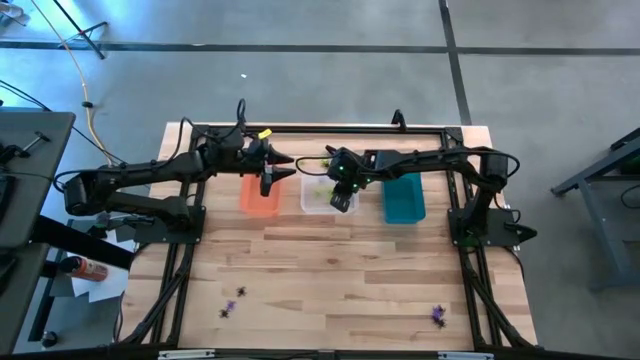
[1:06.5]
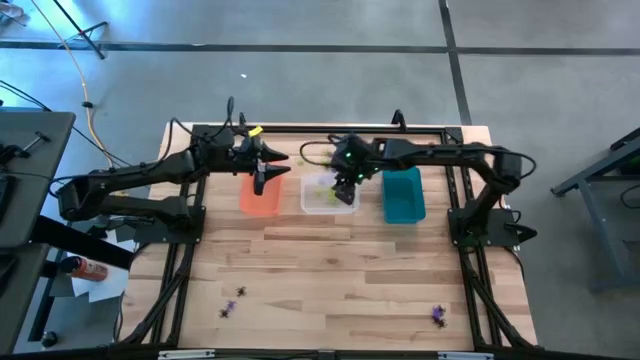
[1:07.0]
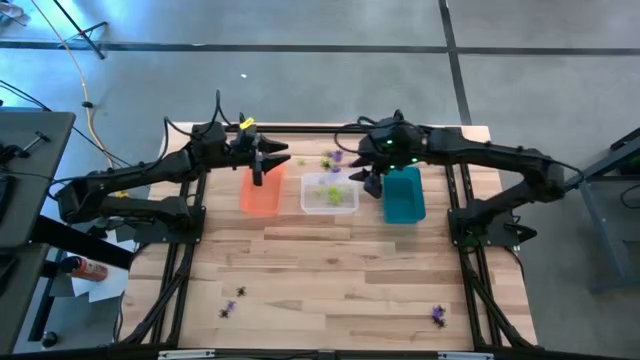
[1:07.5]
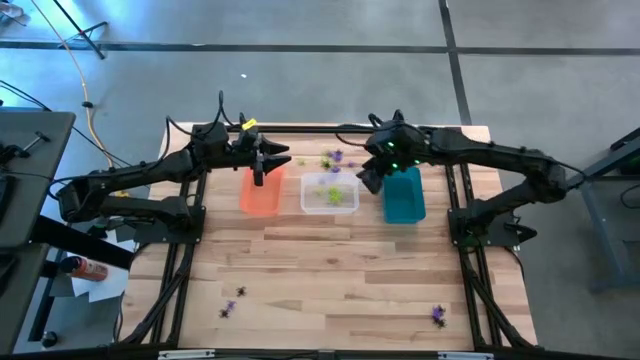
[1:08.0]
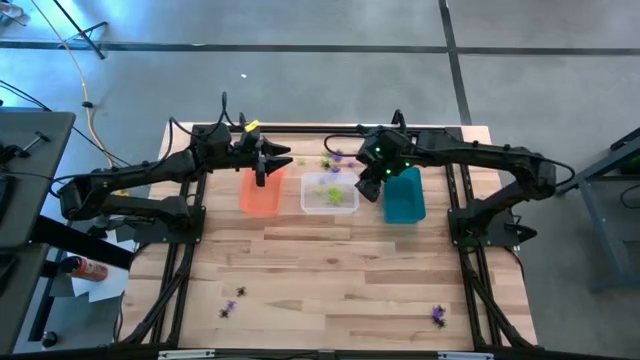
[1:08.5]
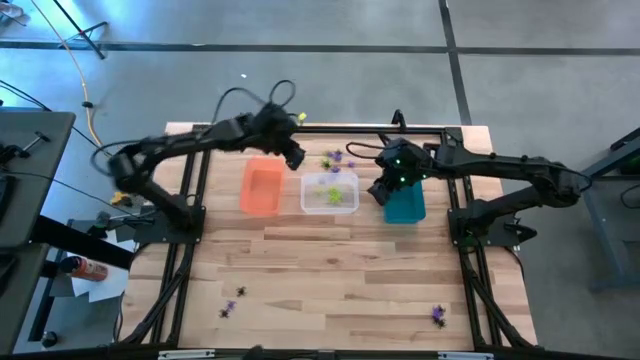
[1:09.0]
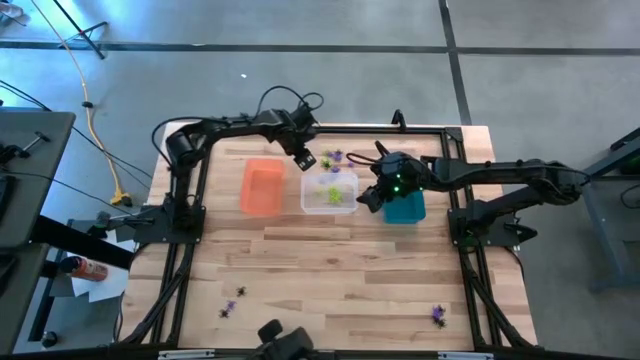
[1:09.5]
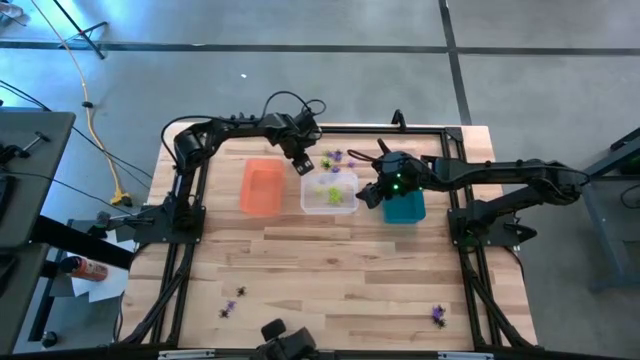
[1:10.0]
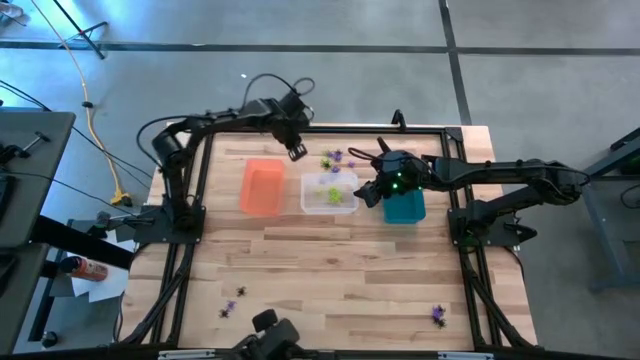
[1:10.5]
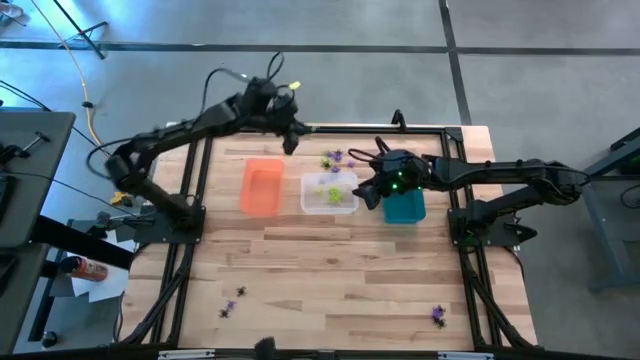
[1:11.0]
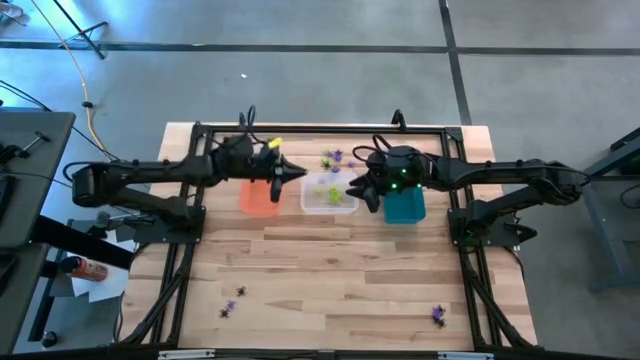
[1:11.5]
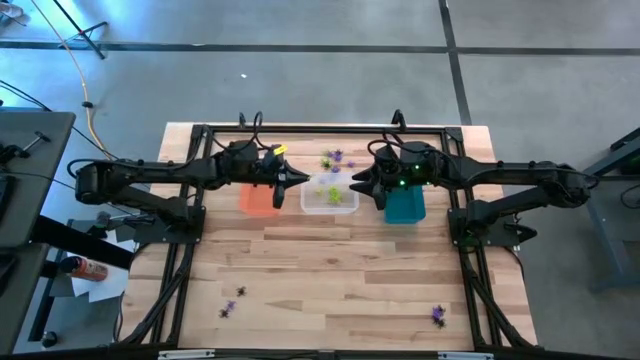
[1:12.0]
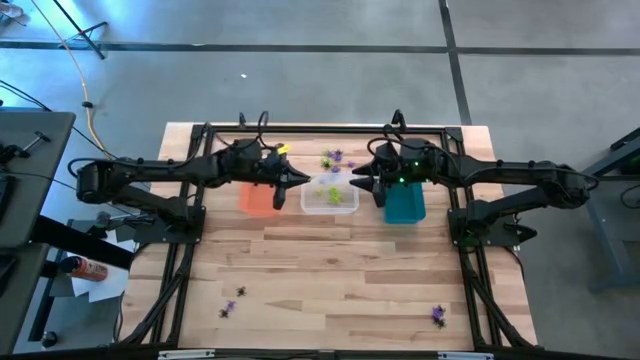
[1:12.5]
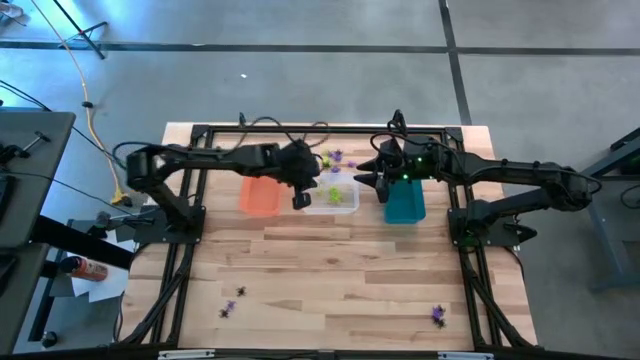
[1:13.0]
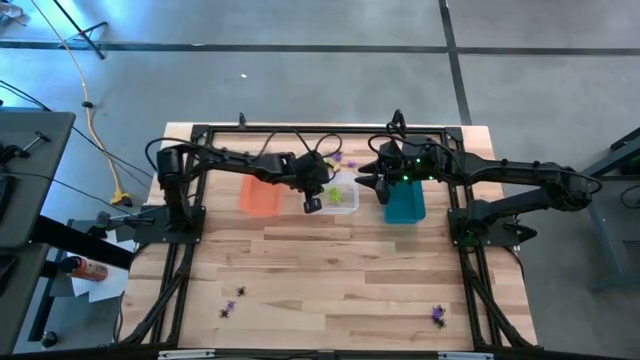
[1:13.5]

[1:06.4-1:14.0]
Task: Sort Halloween decoration
Put the green spider toy into the transparent bin

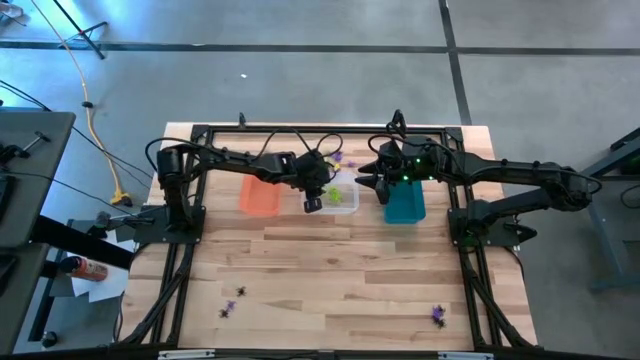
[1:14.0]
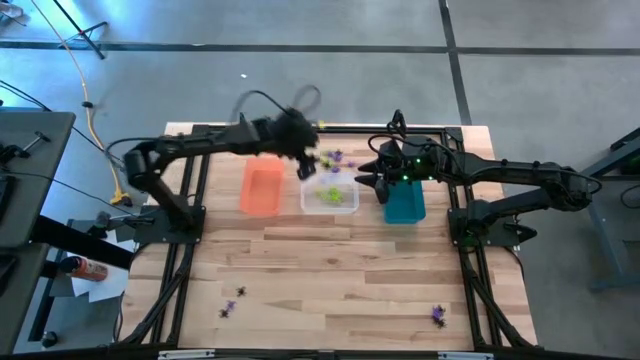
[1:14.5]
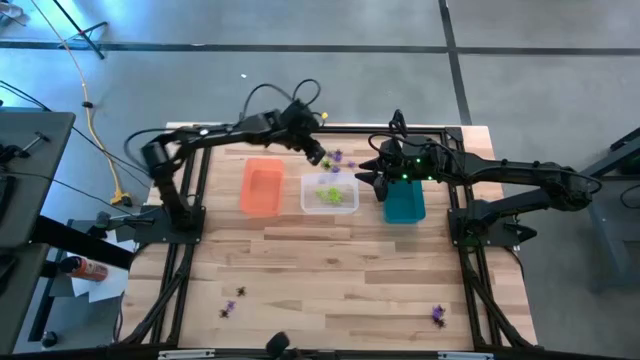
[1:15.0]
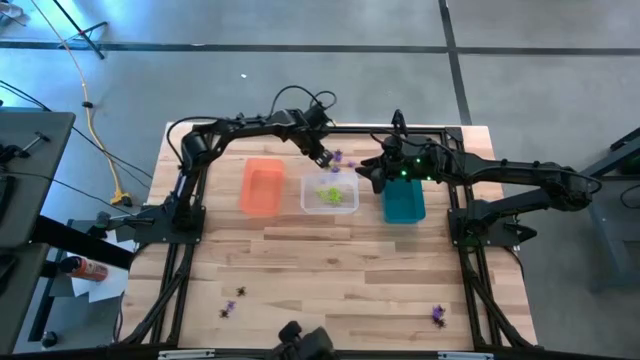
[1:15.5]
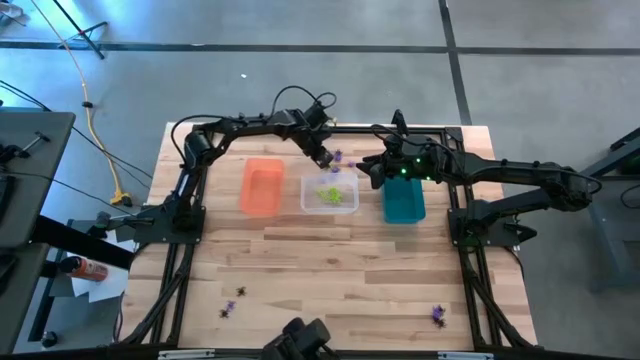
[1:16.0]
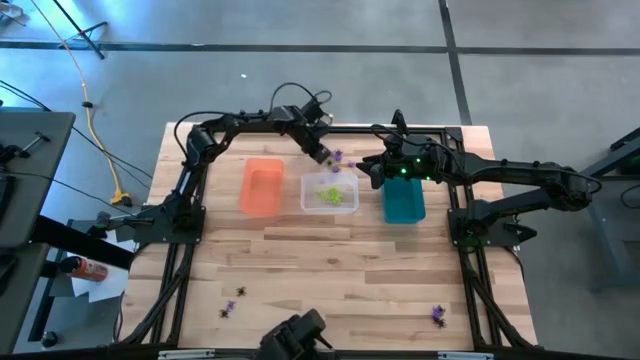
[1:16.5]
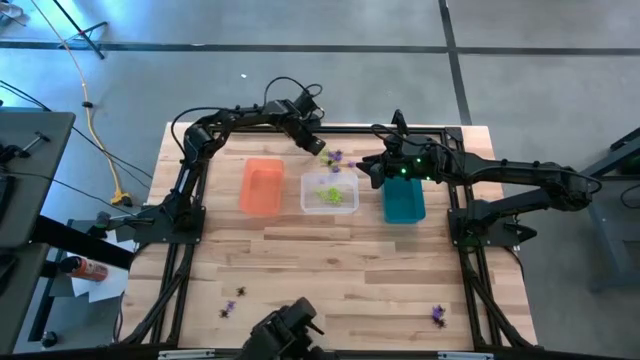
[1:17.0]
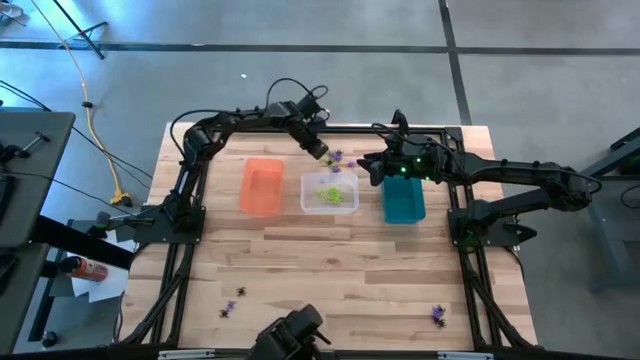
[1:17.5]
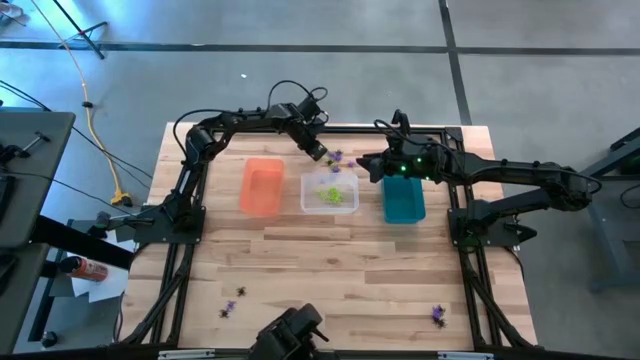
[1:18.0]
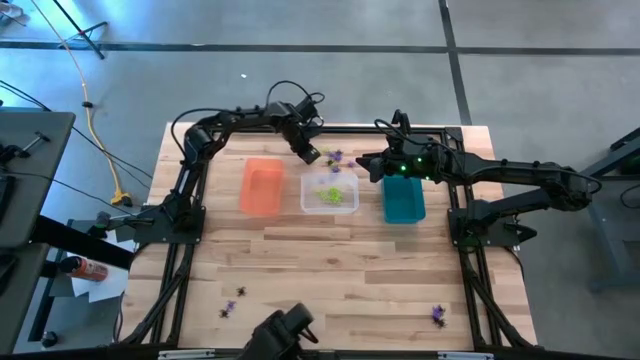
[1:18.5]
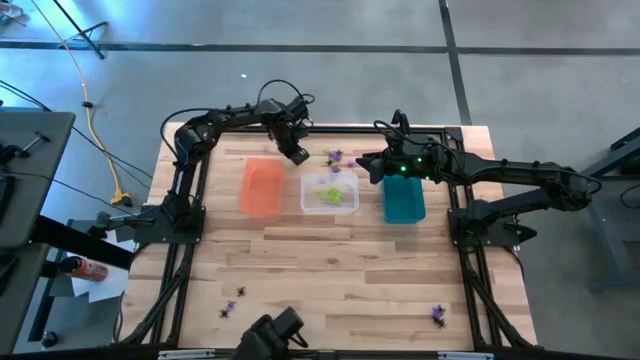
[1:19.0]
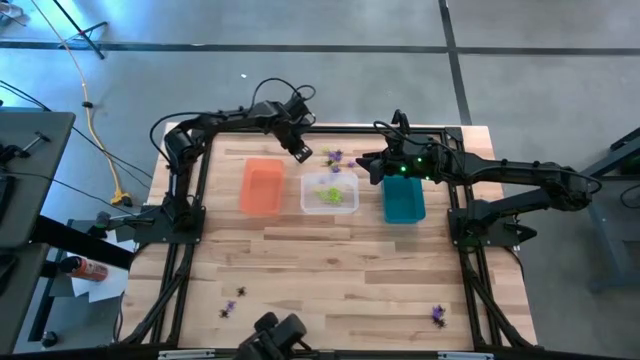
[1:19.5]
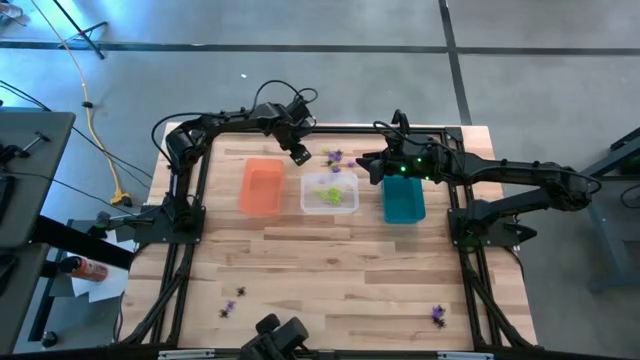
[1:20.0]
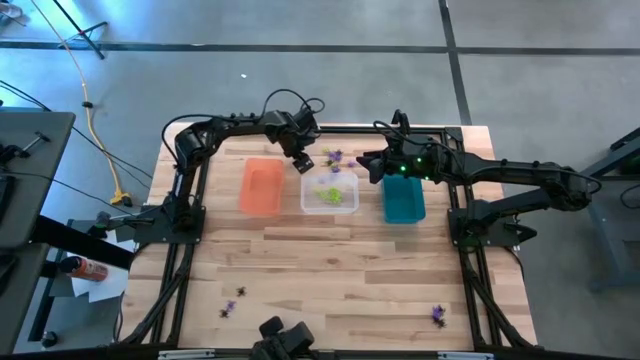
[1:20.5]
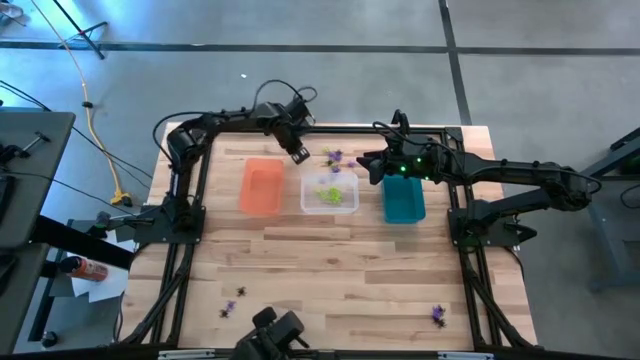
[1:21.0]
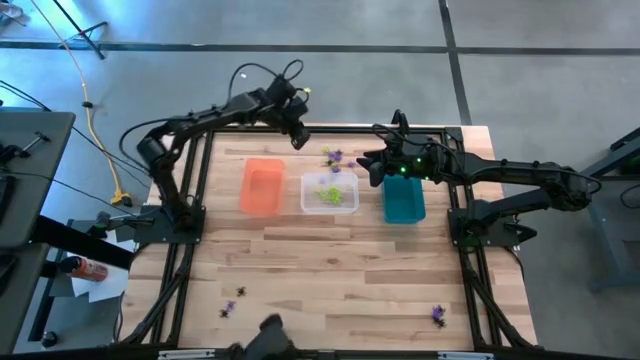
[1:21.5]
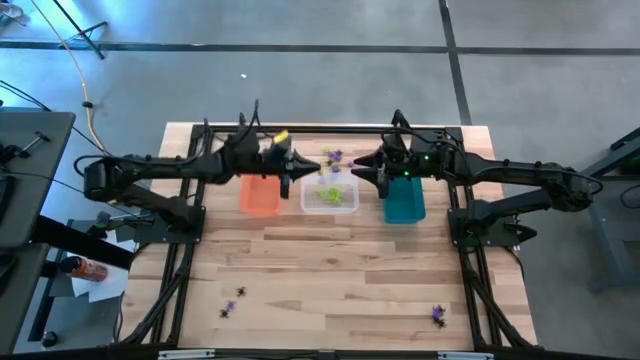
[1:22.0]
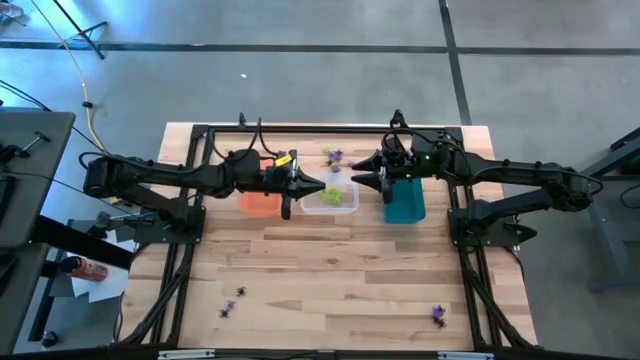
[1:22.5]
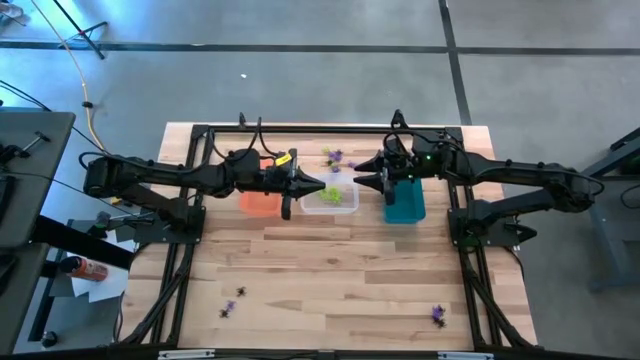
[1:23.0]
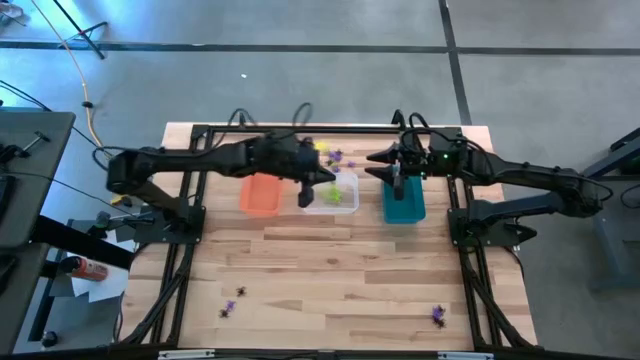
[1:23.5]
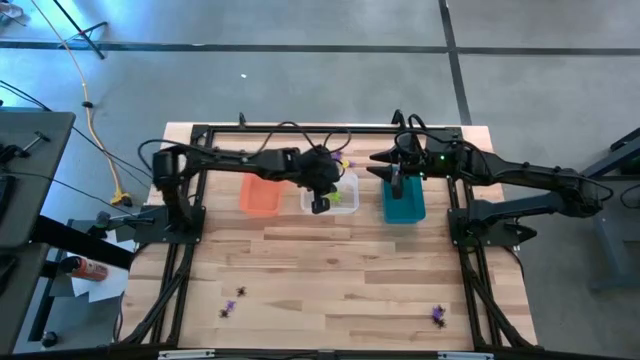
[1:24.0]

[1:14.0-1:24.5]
Put the green spider toy into the transparent bin

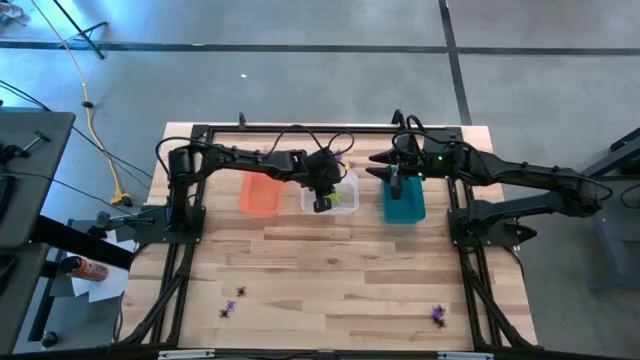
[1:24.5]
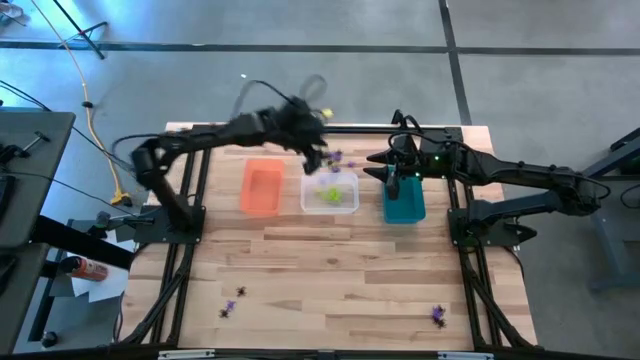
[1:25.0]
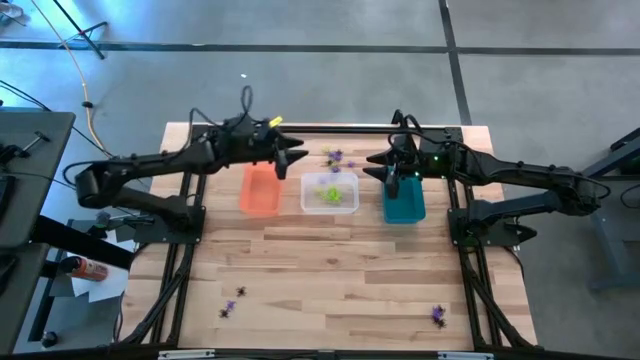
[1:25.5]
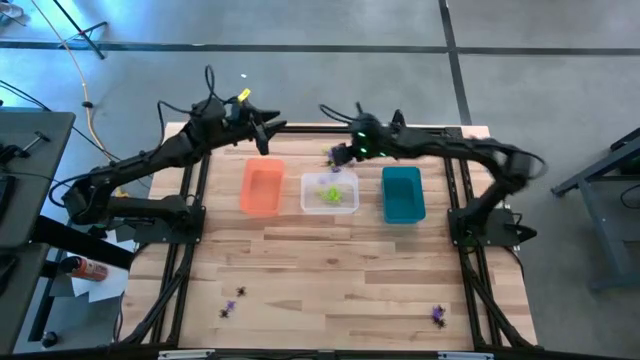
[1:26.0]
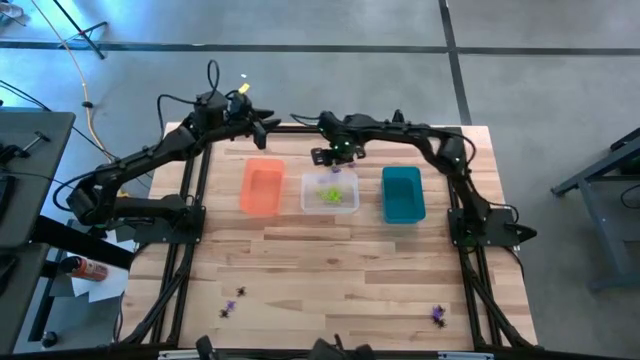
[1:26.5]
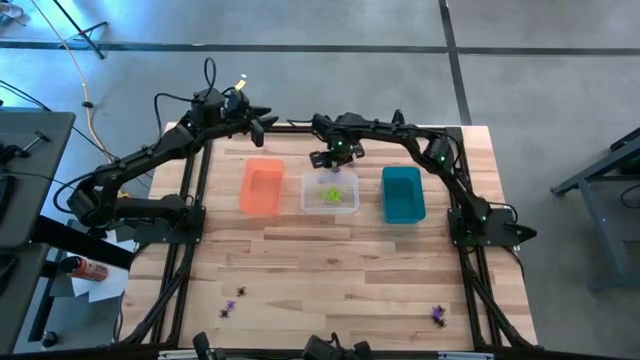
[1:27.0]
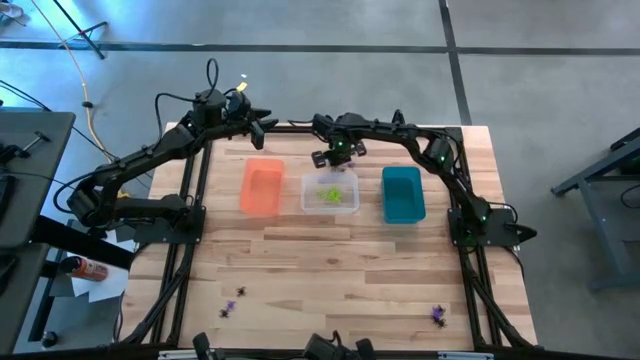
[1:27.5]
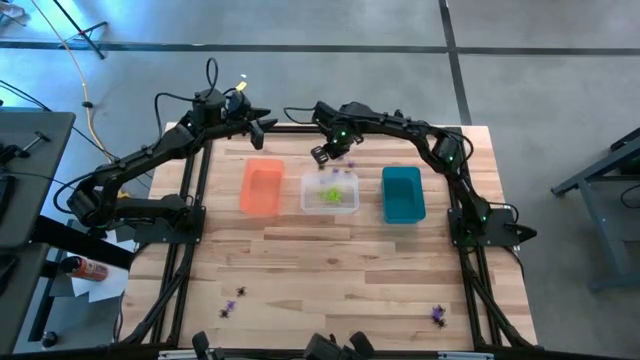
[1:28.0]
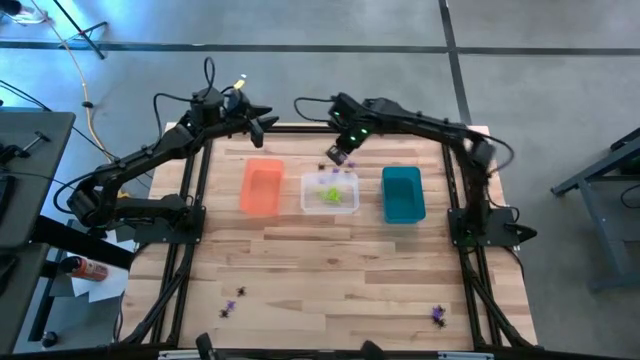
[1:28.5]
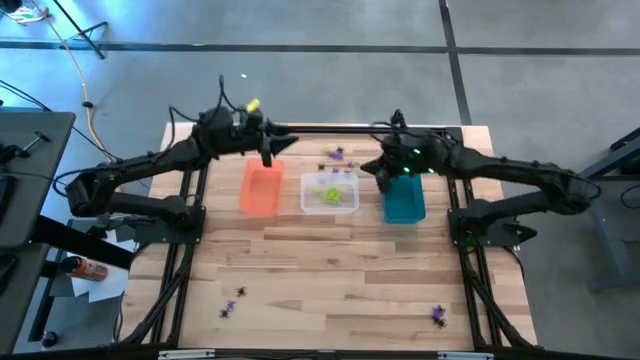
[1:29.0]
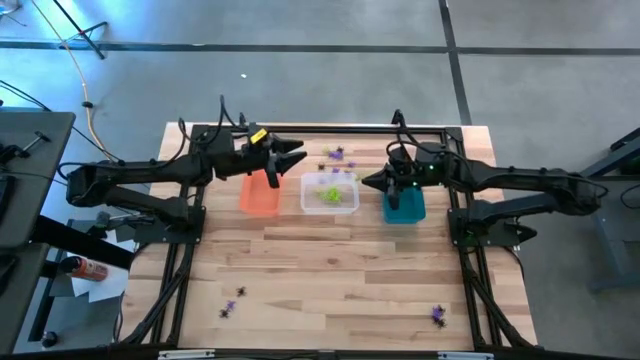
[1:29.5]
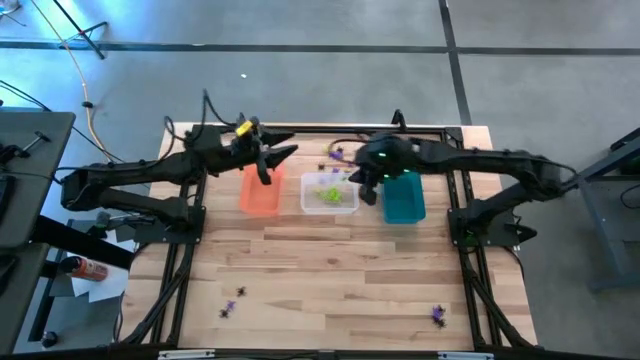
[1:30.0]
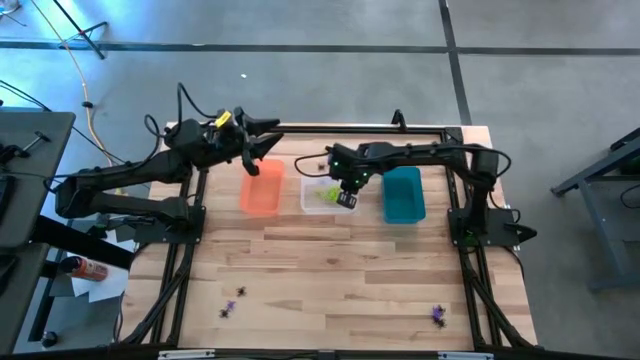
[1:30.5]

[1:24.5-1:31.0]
Put the green spider toy into the transparent bin
